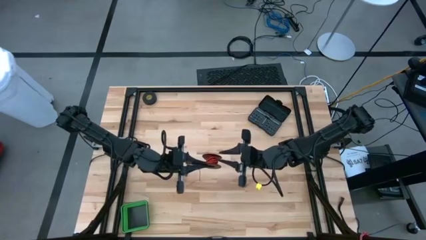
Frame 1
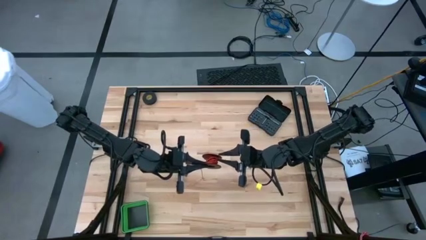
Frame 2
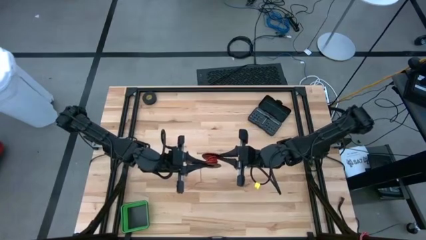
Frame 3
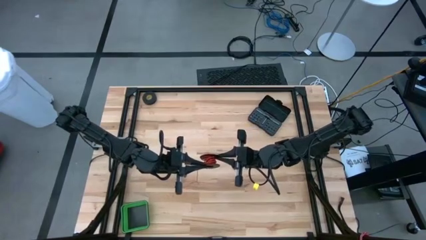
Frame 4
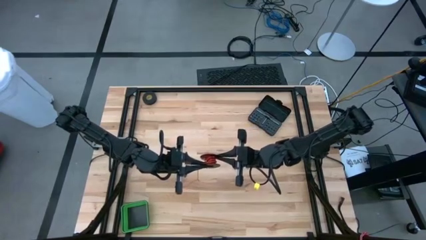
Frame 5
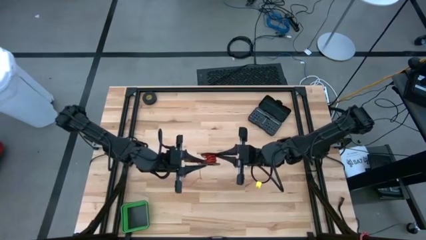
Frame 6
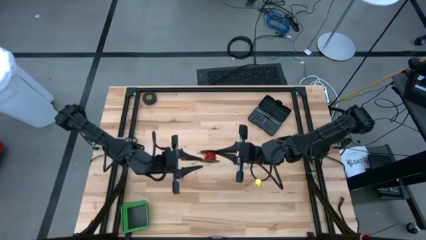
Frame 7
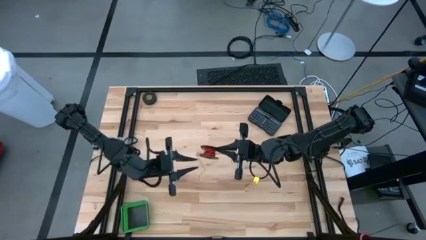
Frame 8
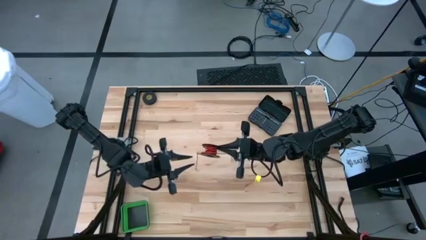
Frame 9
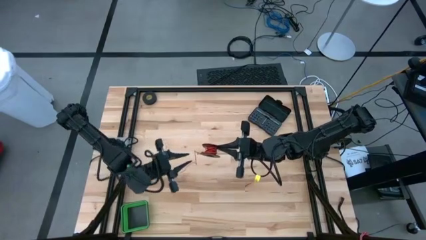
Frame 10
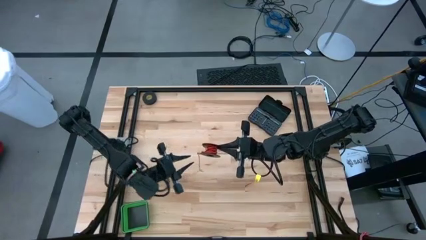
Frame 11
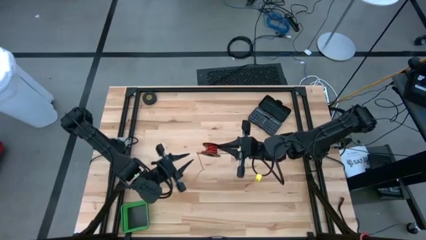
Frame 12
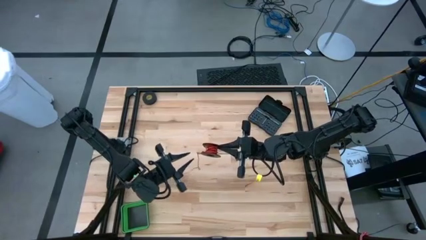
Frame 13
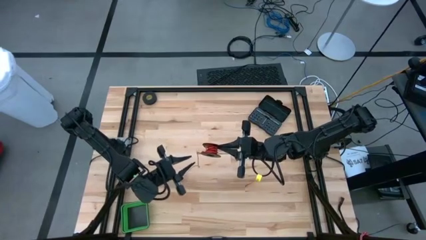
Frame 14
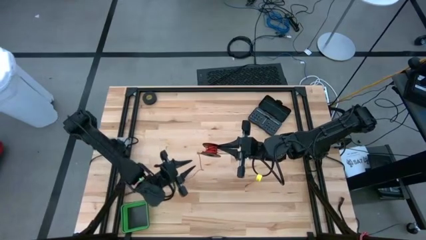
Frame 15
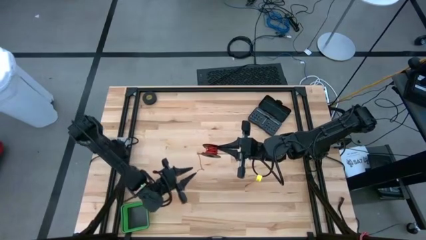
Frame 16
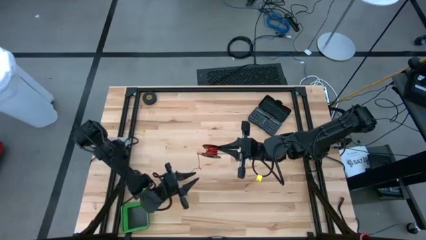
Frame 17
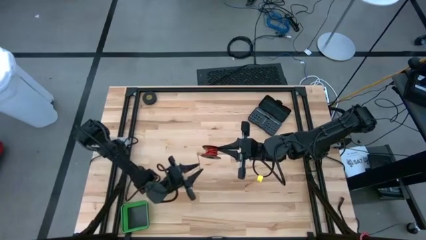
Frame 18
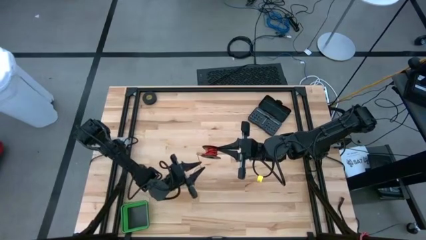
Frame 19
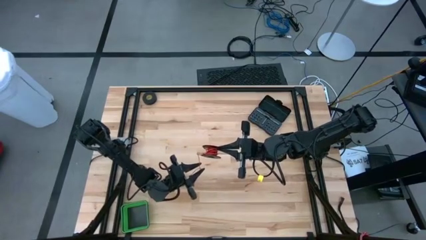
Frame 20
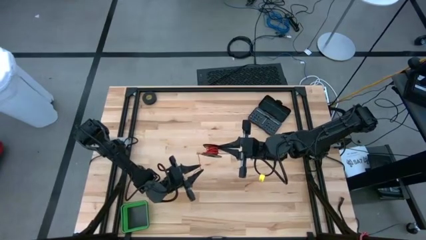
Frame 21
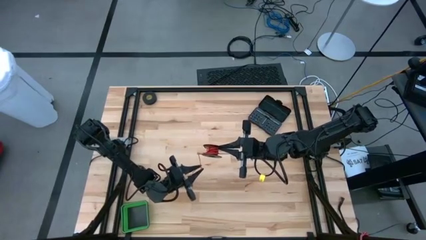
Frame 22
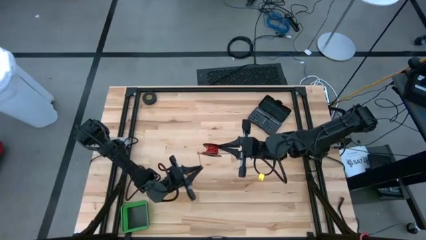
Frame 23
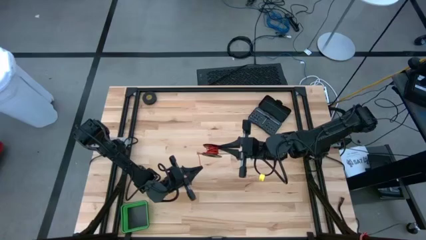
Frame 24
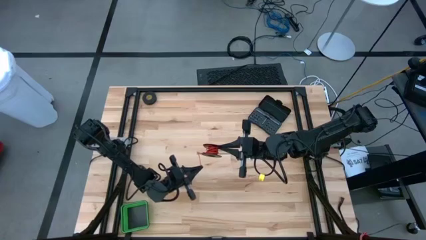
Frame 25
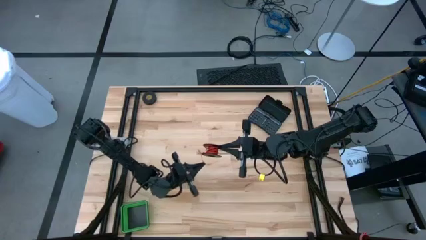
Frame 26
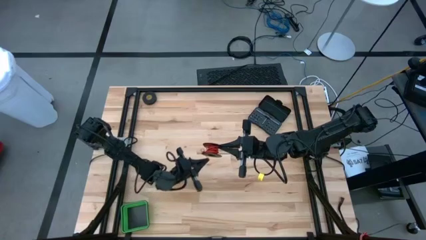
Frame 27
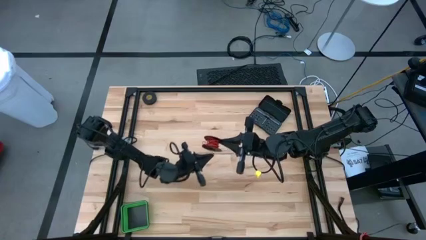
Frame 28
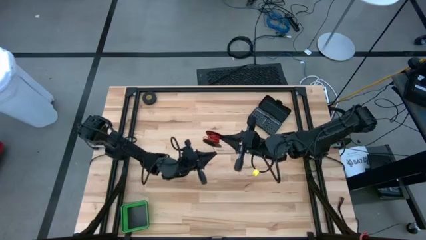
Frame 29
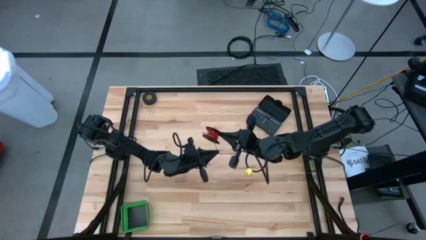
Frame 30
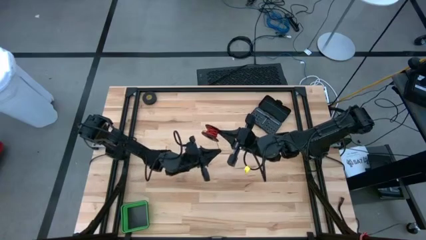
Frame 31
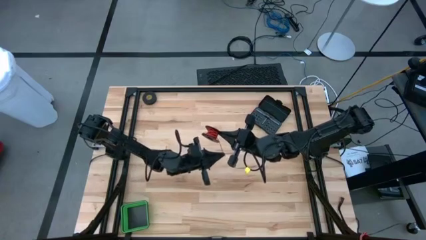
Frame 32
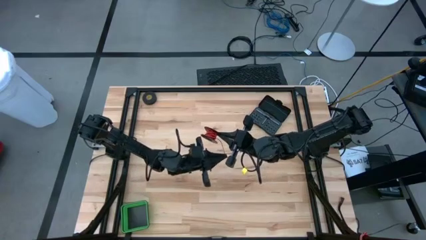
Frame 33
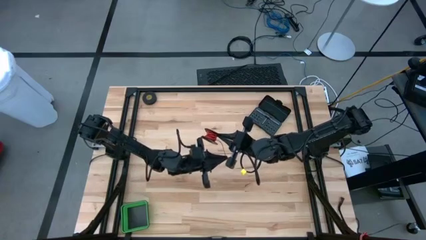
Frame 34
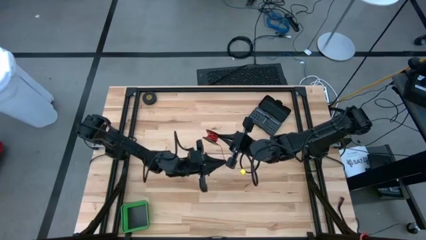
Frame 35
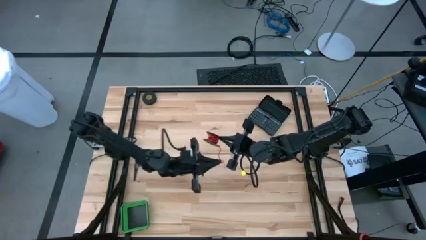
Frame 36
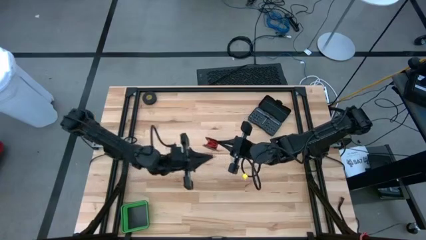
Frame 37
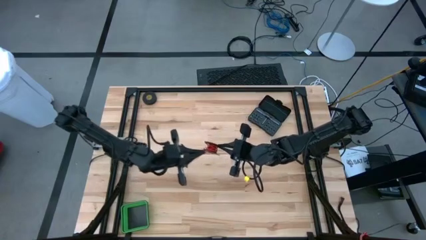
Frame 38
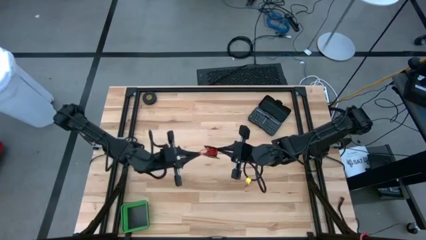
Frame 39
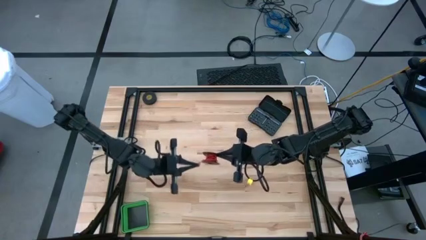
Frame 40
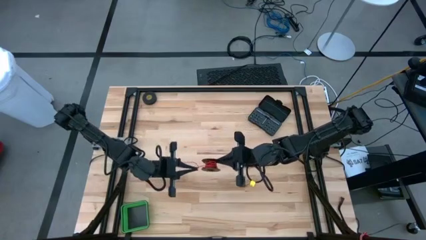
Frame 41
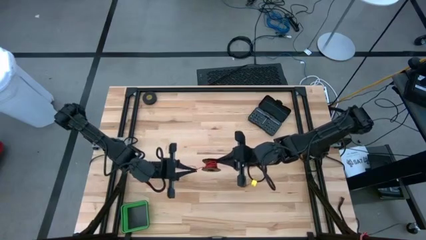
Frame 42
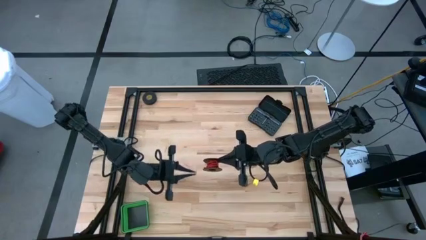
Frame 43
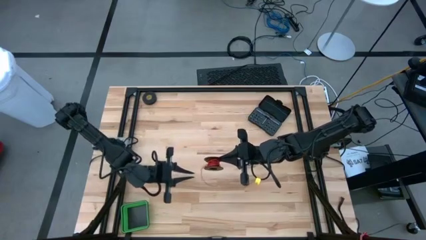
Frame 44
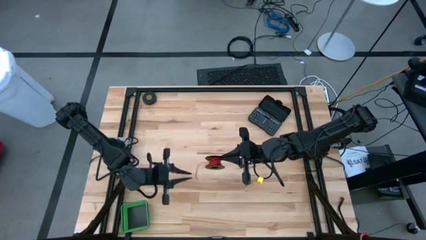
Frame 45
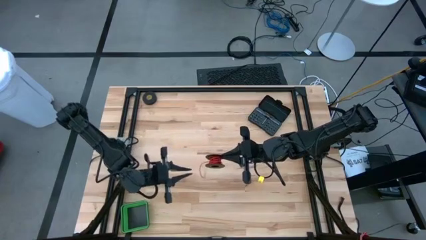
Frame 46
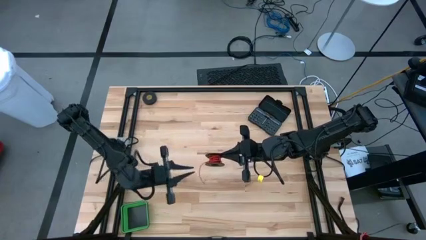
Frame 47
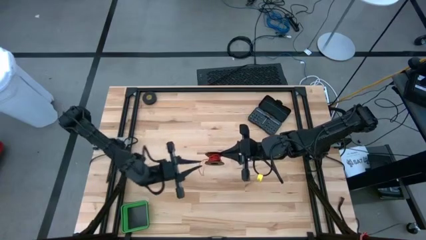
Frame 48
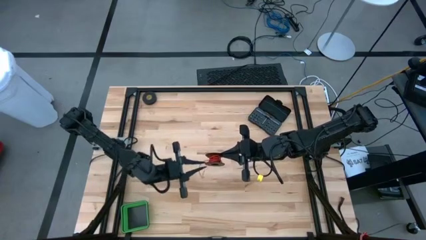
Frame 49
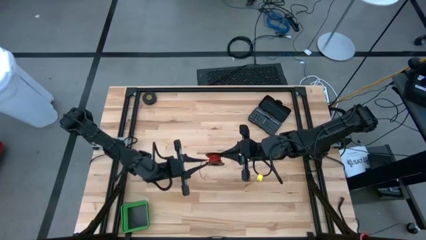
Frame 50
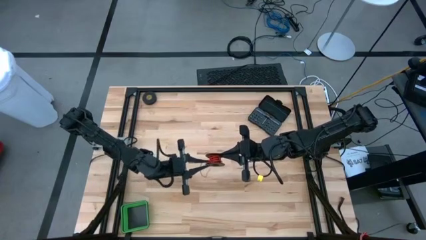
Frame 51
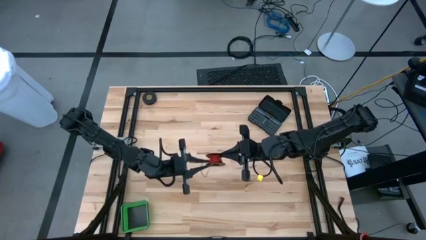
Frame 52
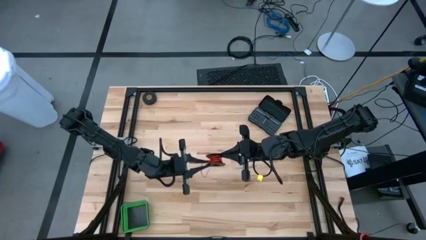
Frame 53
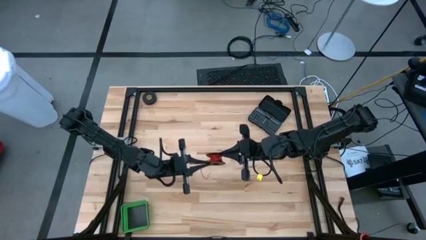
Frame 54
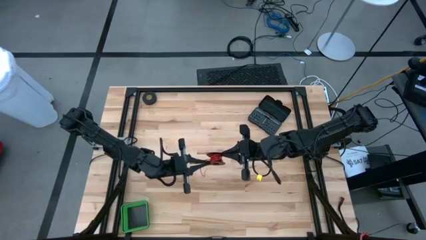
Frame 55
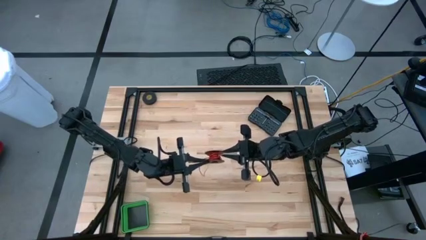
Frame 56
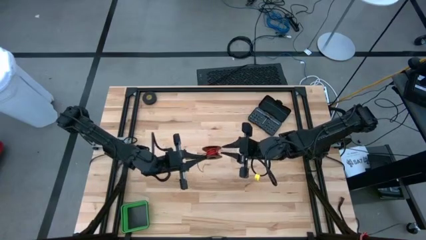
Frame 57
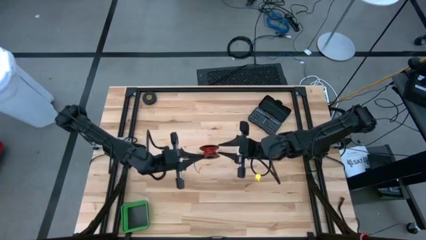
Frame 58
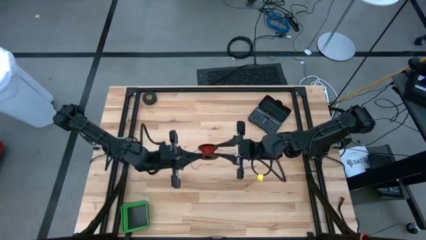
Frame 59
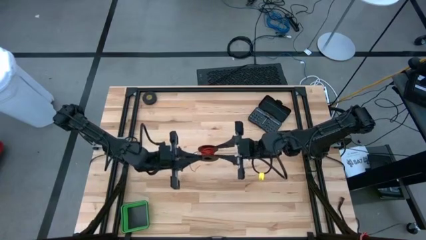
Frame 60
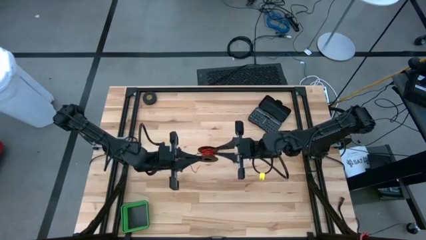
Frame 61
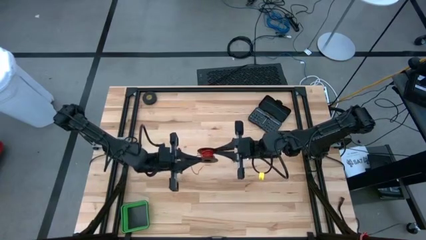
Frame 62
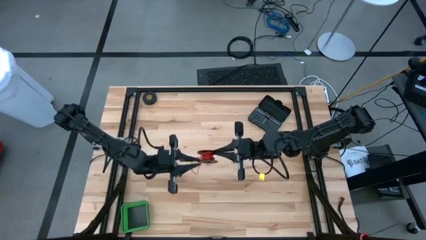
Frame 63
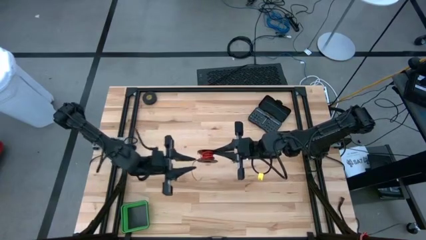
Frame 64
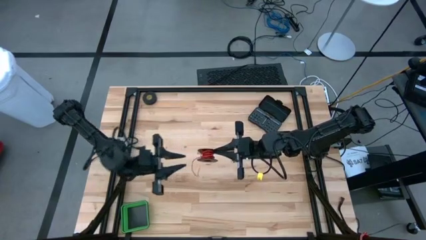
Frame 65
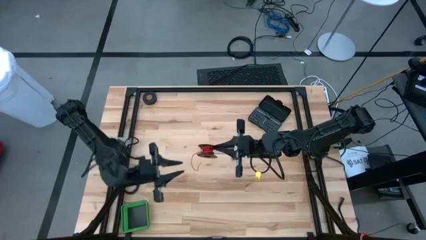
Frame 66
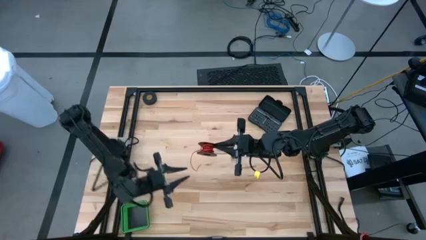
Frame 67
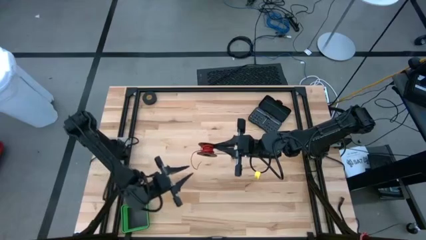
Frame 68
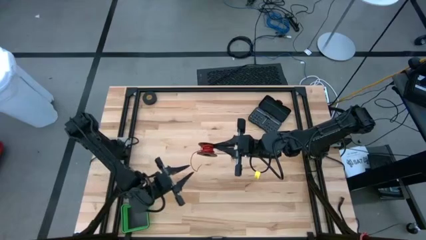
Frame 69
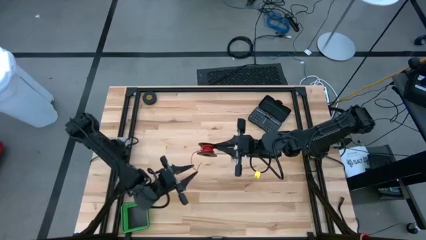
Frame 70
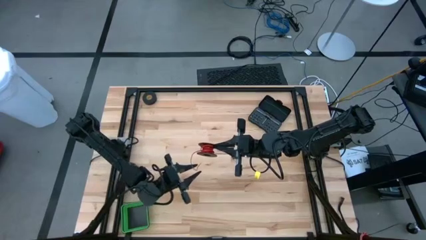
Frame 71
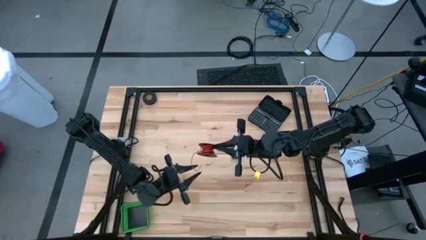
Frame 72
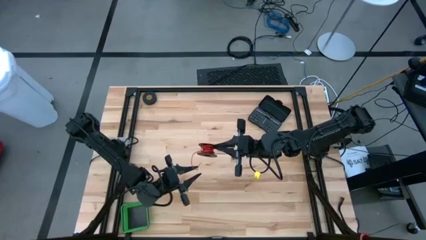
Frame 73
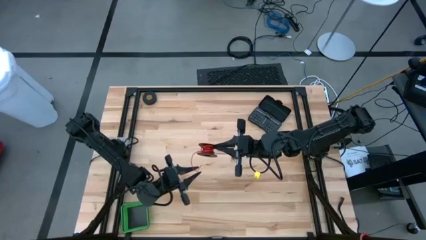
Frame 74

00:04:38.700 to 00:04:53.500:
Task: Coil cords
Coil the red wire into the spool

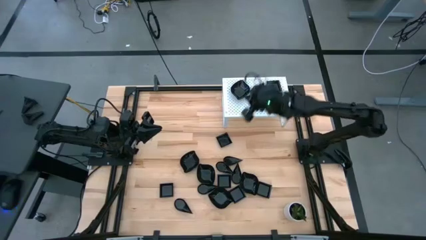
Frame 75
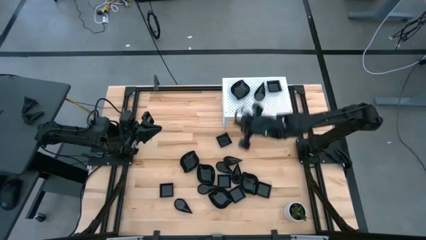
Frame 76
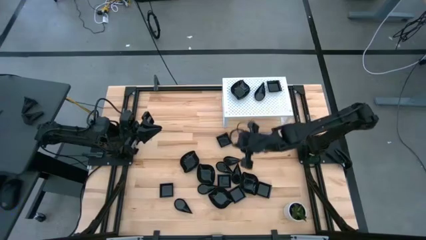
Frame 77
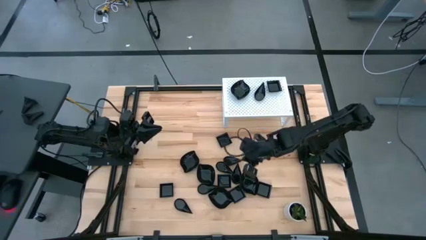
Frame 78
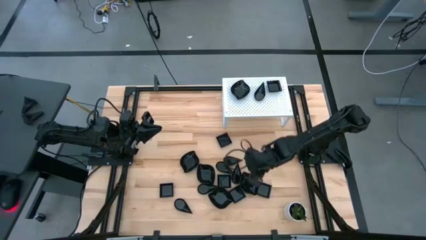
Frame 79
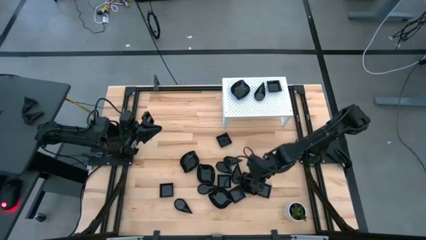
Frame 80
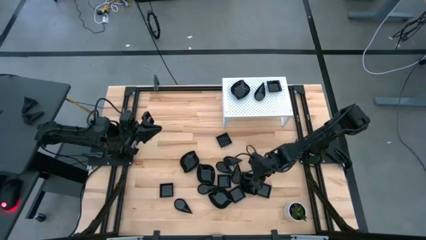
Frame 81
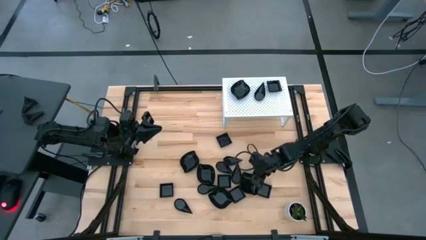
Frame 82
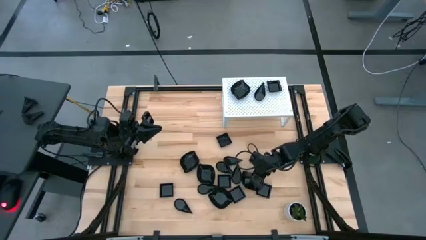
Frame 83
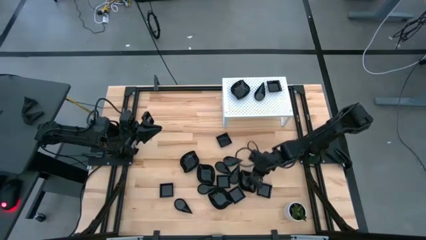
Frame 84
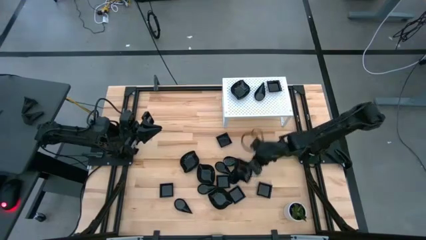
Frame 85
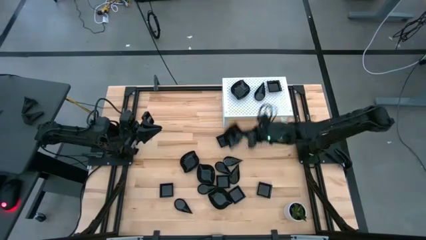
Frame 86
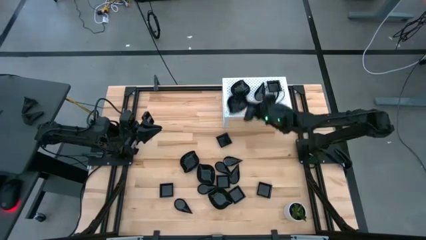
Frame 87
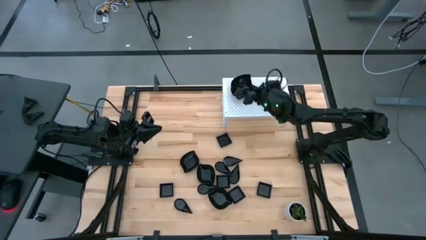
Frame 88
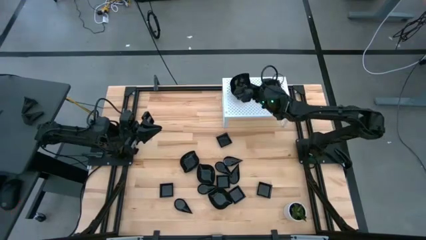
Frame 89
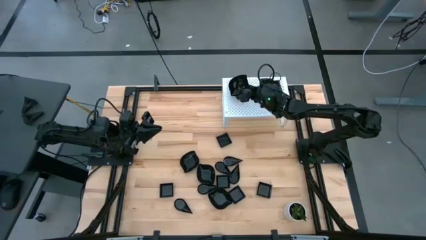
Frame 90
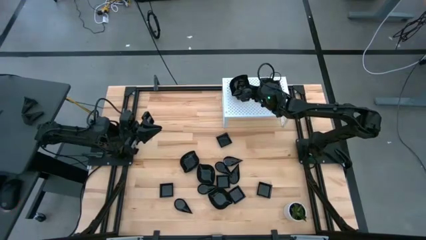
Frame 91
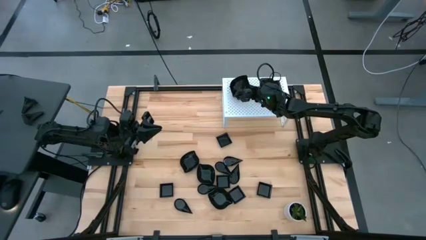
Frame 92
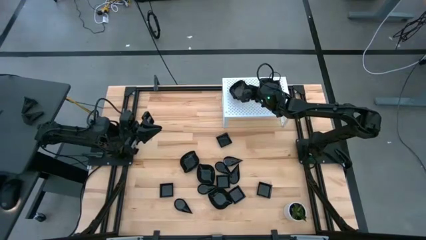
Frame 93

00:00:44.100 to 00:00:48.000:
Task: Pick & Place Mini shaped plates
Stack the leaf shaped plate on top of the leaf shaped plates on the shelf
